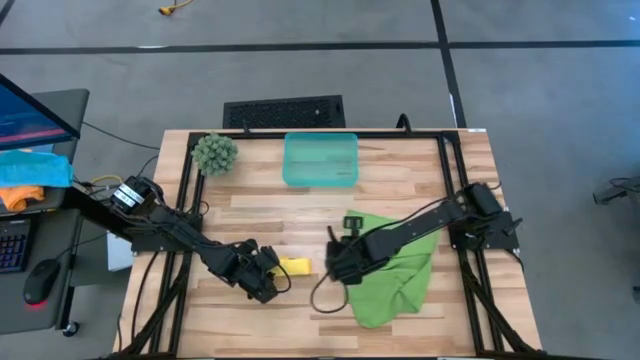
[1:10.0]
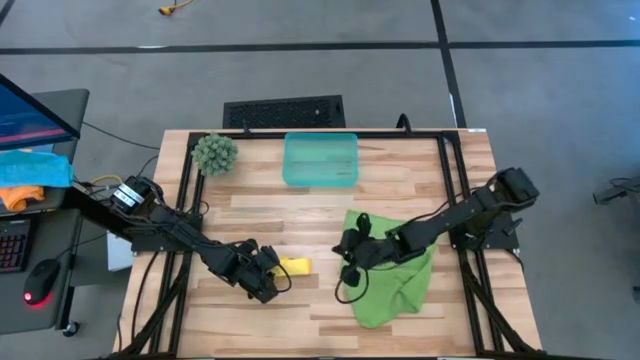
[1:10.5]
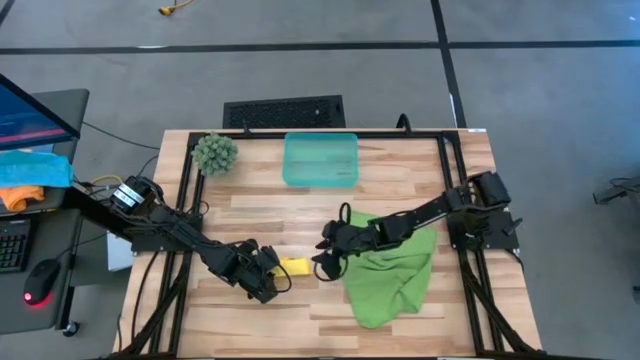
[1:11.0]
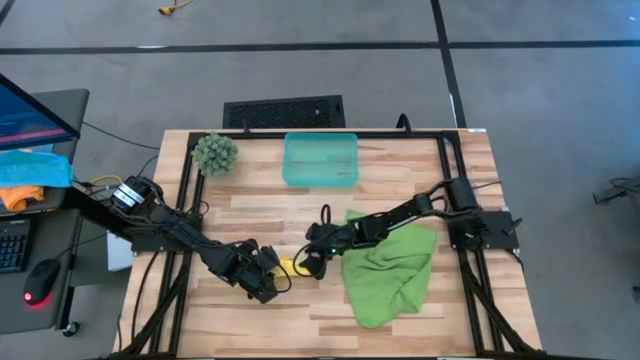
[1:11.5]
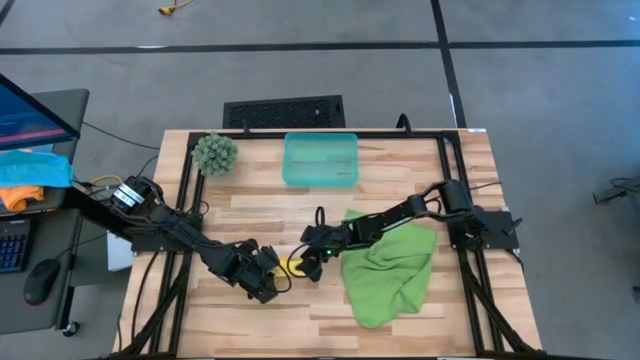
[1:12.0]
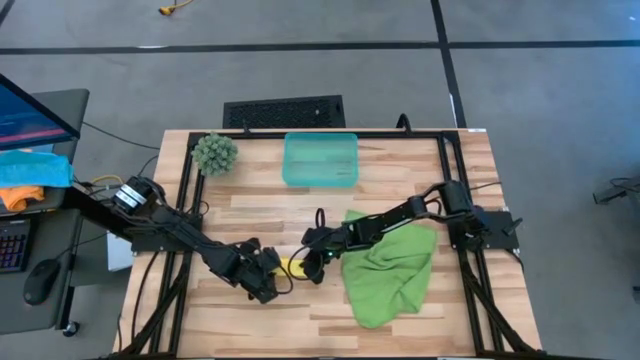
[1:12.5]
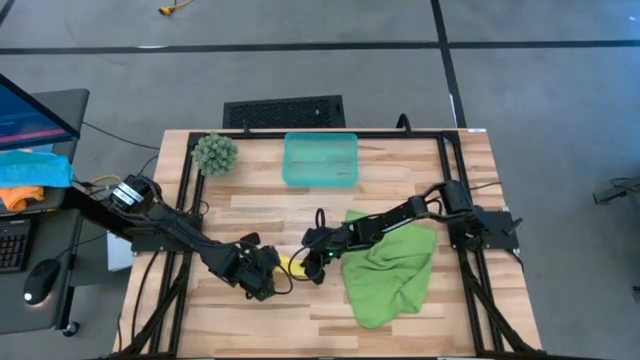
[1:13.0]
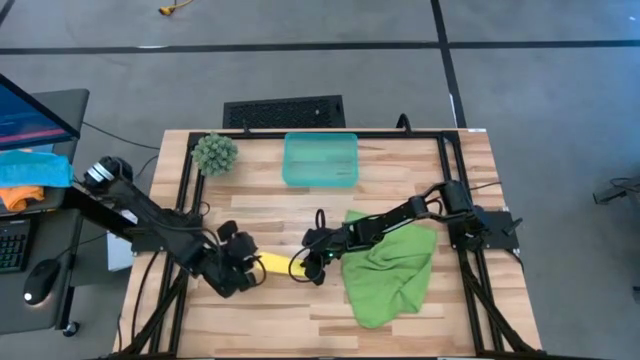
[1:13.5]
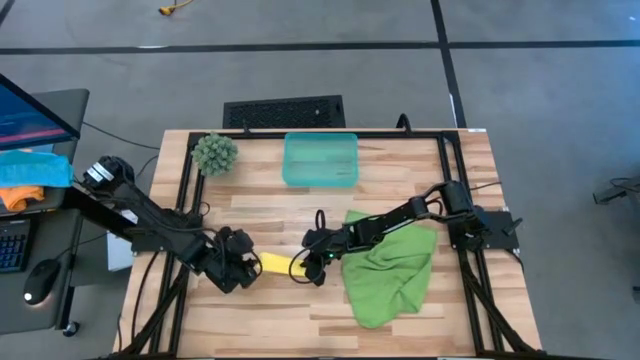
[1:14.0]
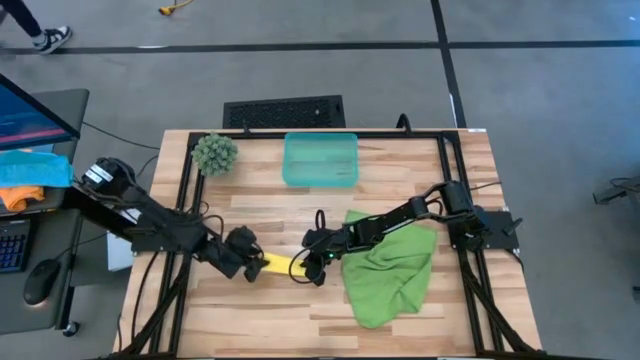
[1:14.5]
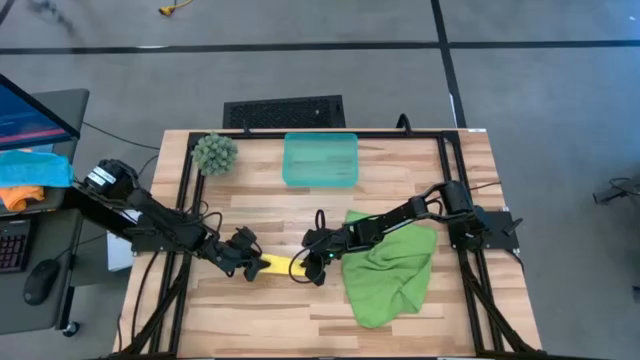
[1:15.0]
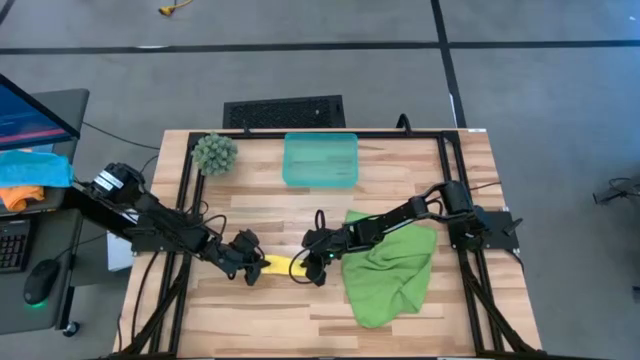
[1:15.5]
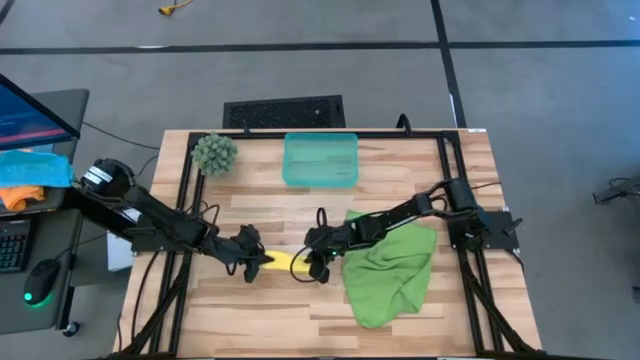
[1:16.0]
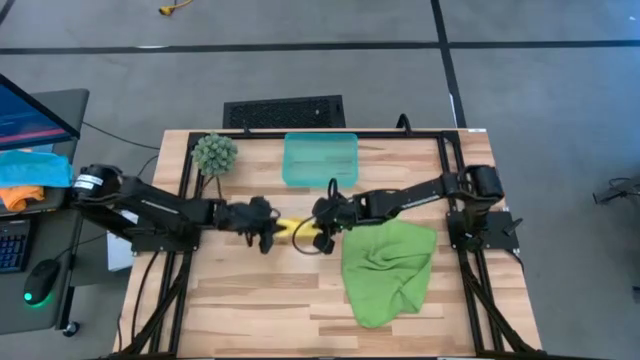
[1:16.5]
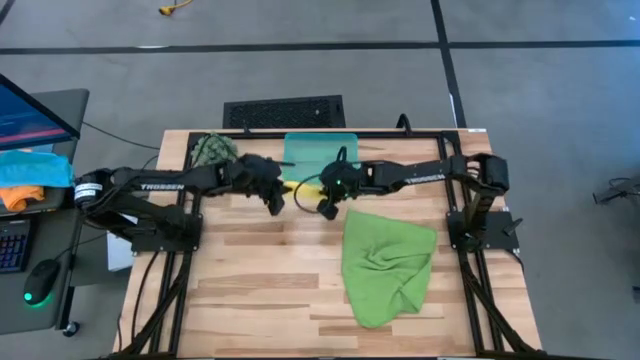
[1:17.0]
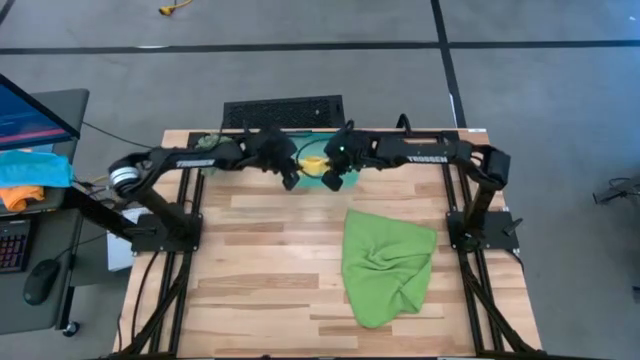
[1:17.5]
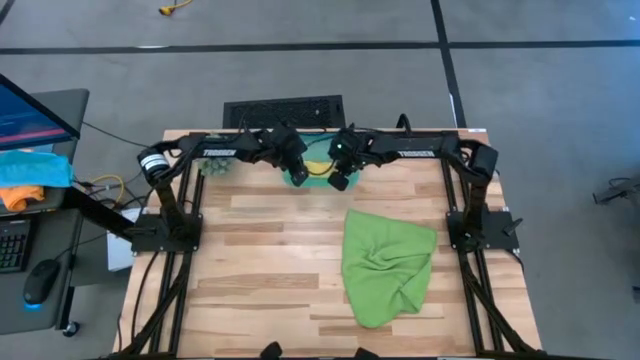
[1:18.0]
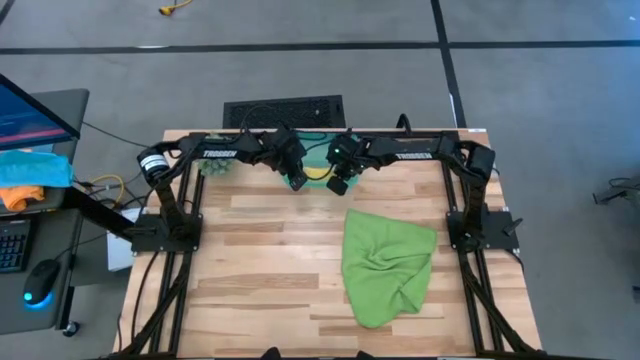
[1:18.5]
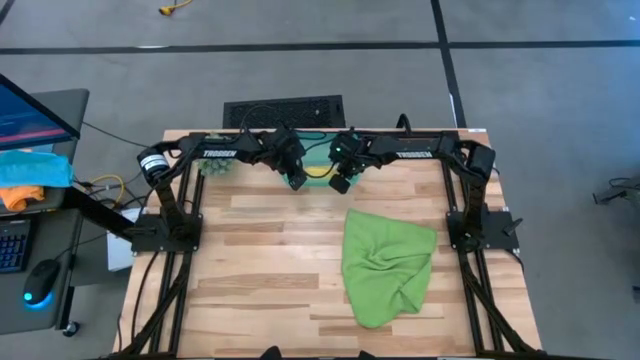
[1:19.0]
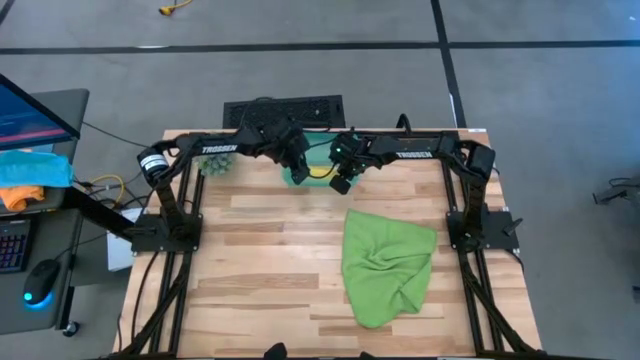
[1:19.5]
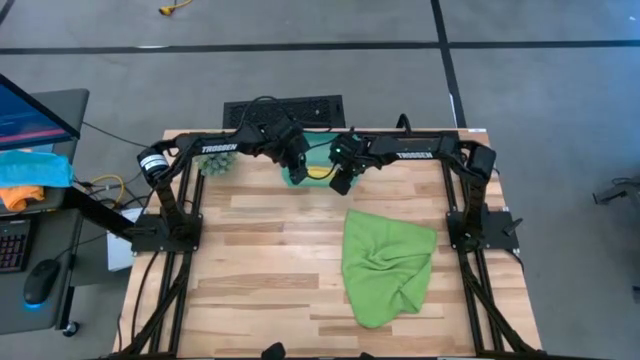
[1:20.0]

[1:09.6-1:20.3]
Task: Roll microfiber towels into tight, uniform cylinder then place into a basket
Put the yellow microfiber cloth into the green bin

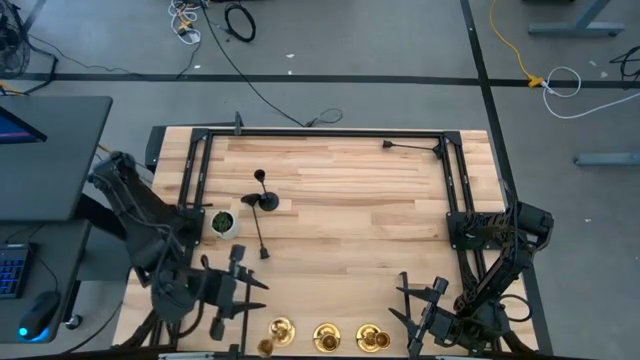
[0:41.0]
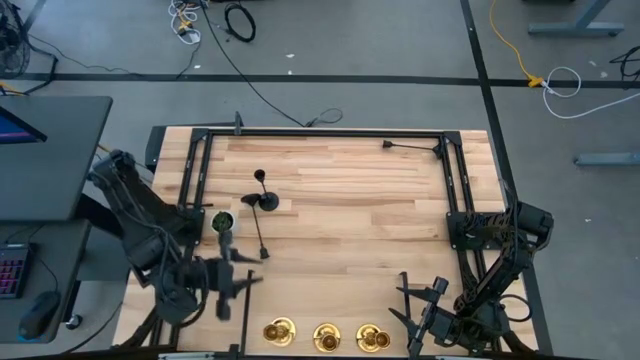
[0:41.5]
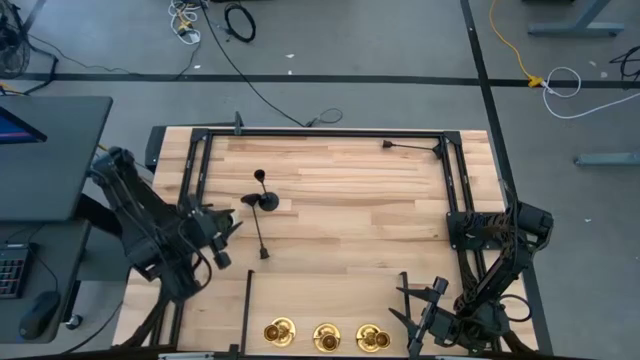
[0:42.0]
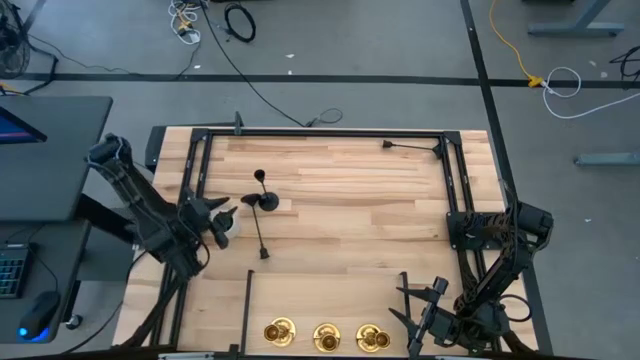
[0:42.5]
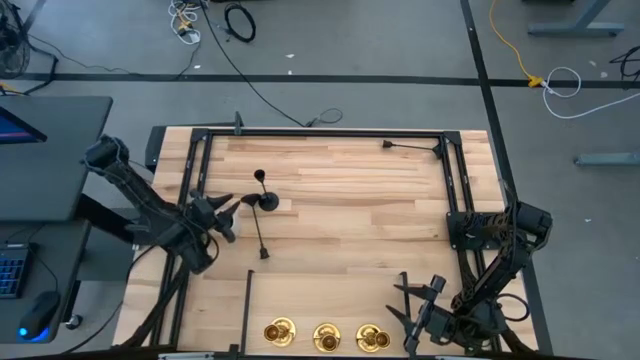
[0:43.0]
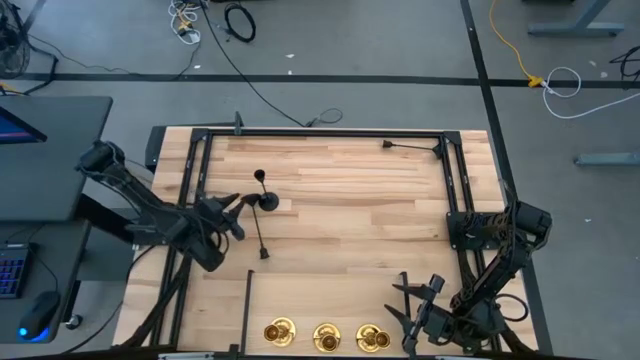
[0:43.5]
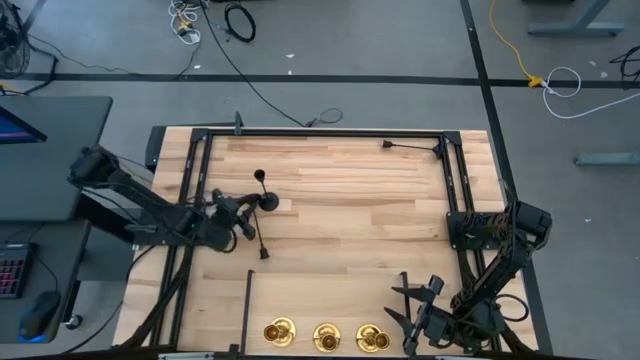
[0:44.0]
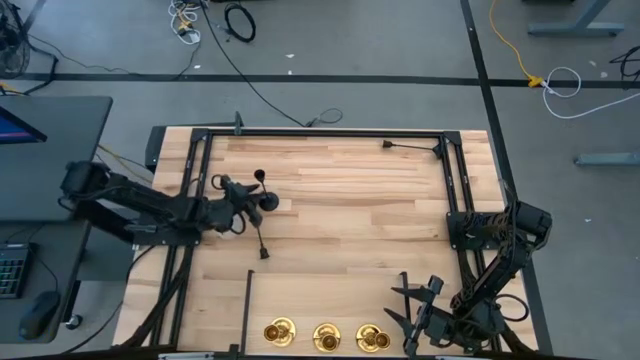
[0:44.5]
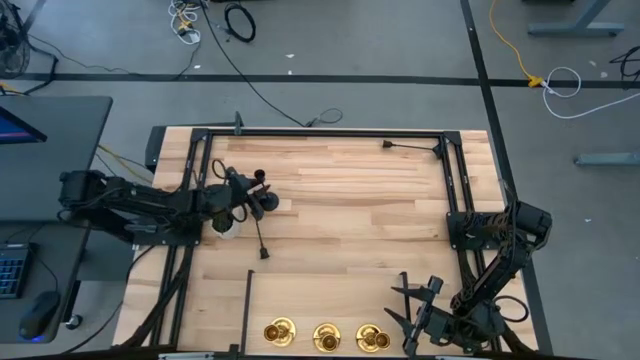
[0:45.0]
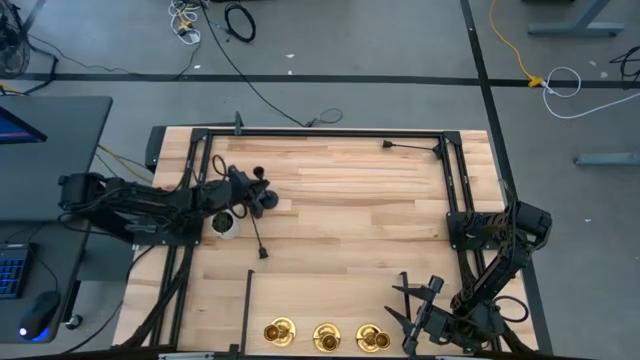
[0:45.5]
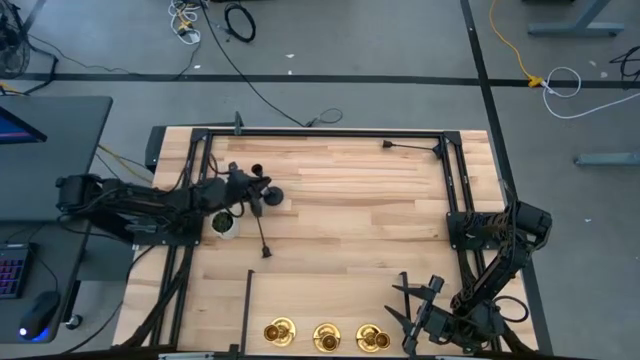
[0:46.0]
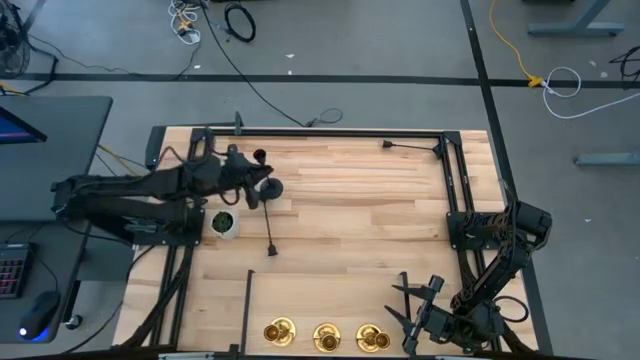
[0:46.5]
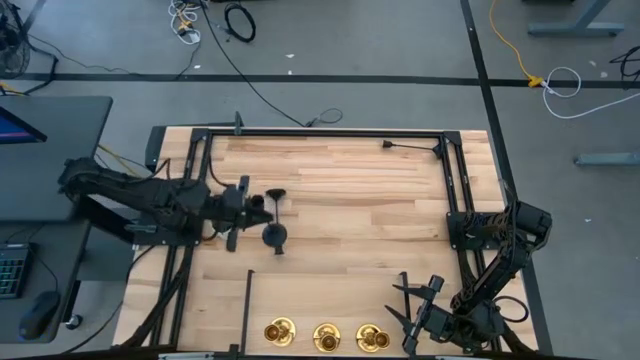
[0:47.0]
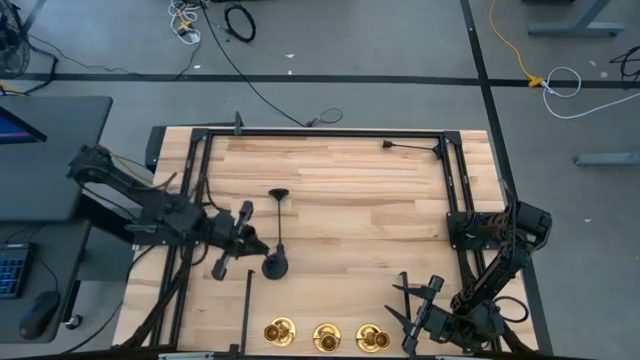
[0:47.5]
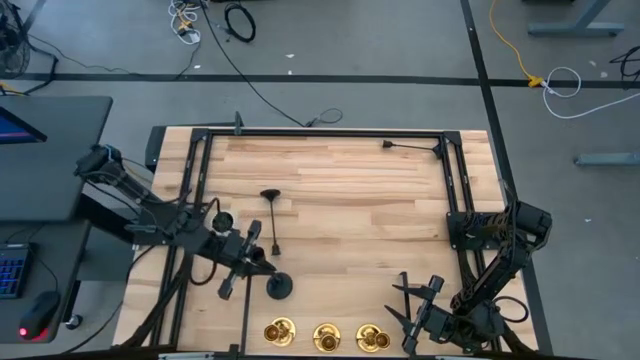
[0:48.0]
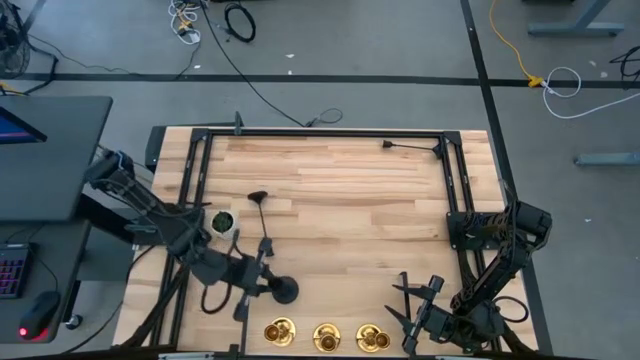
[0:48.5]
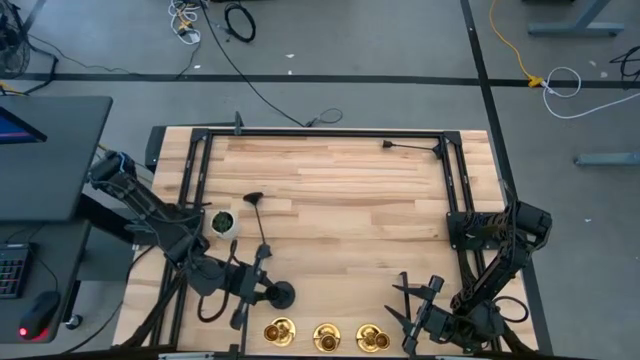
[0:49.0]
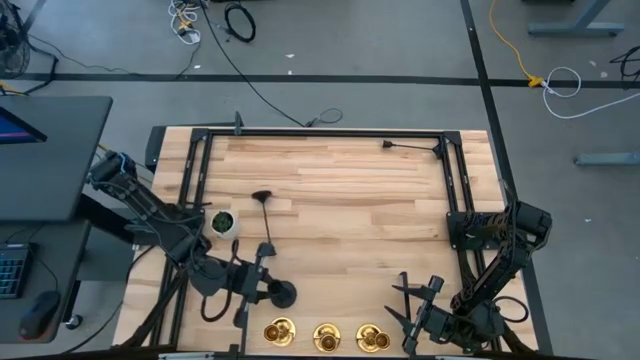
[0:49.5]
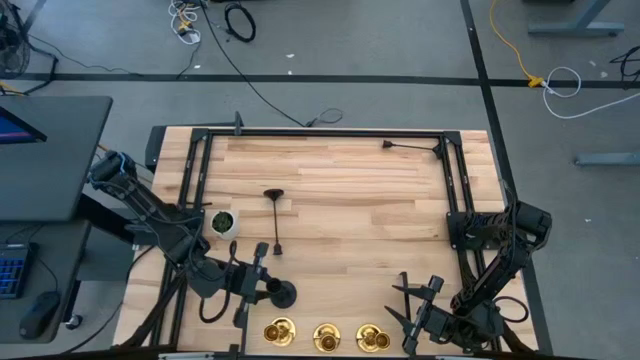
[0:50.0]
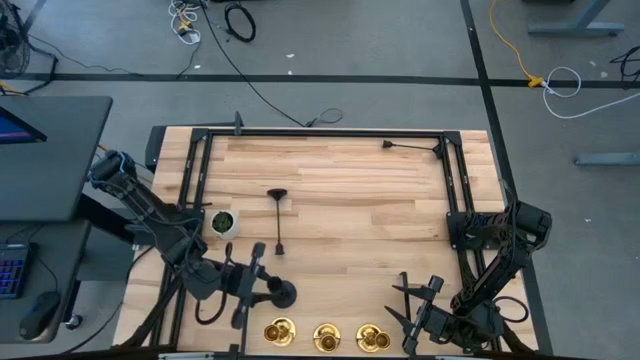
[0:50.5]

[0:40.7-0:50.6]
Task: Pick & Place candle stick holders
Put the middle black candlestick on the shelf
